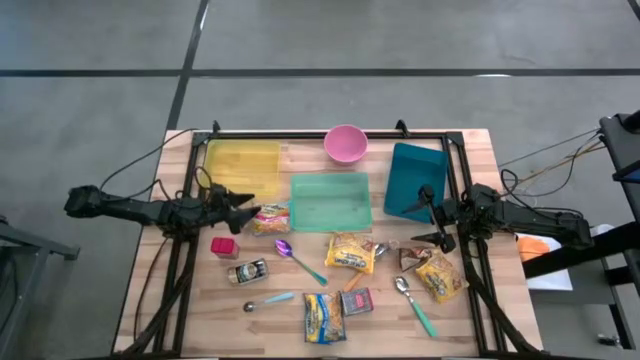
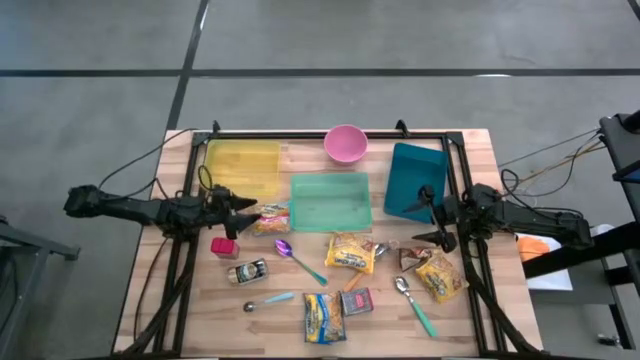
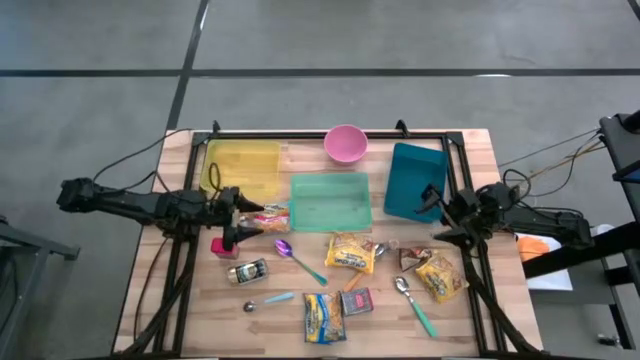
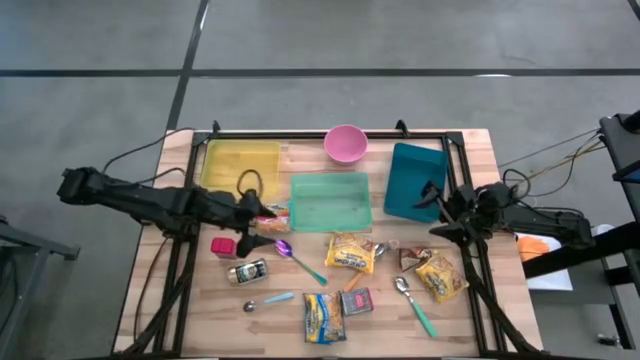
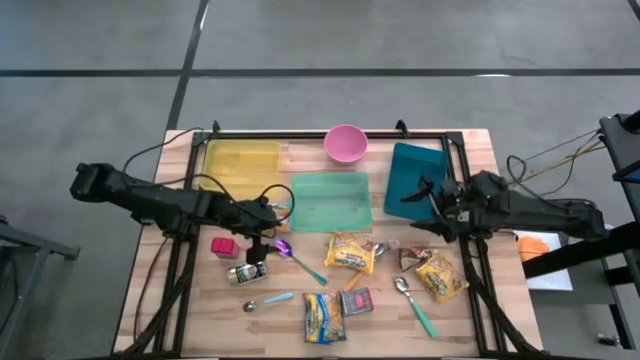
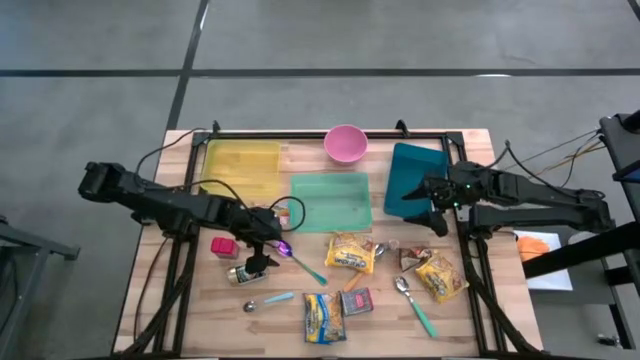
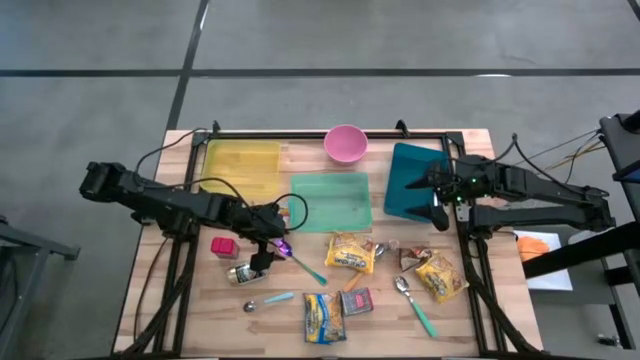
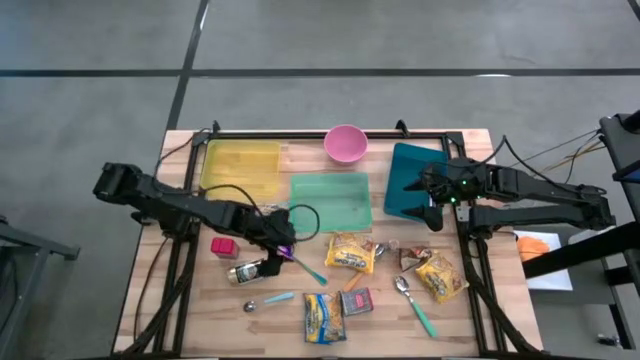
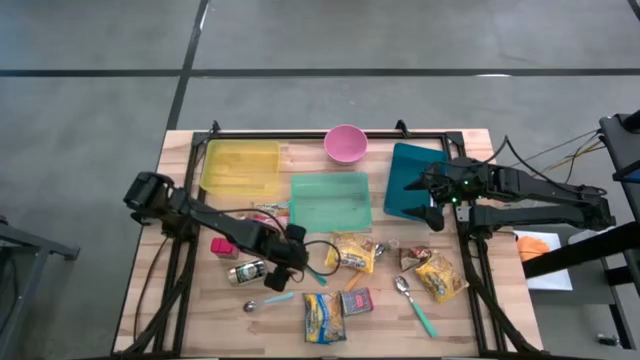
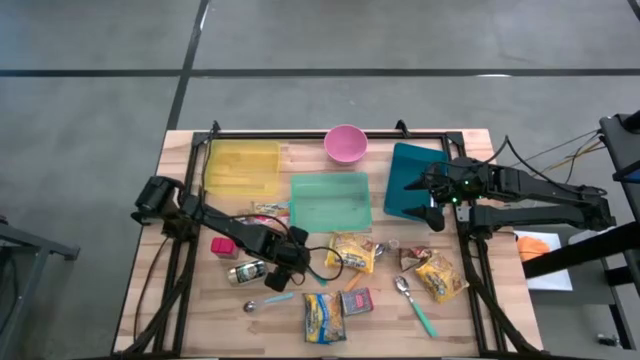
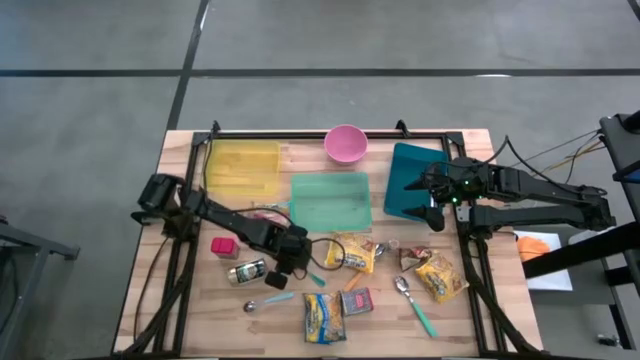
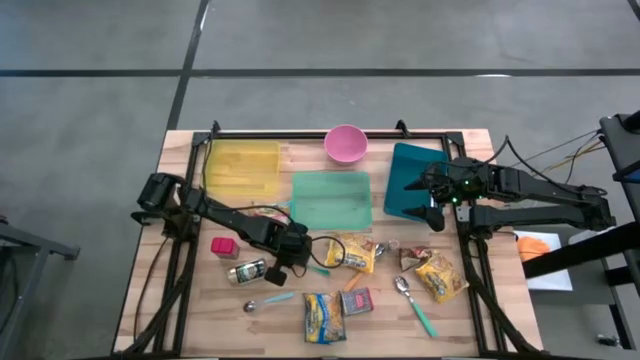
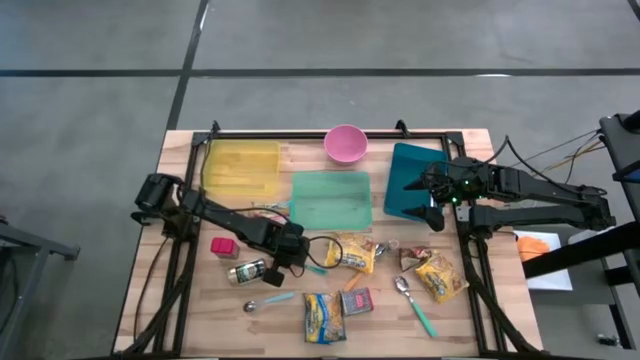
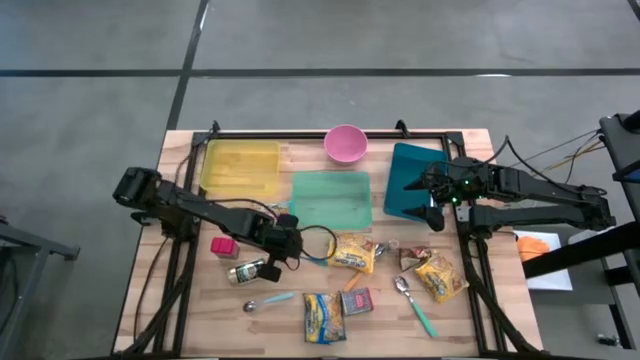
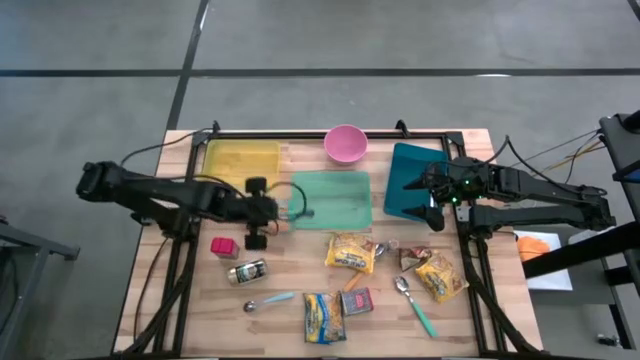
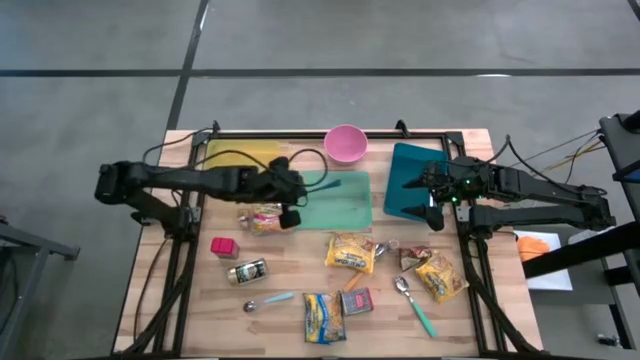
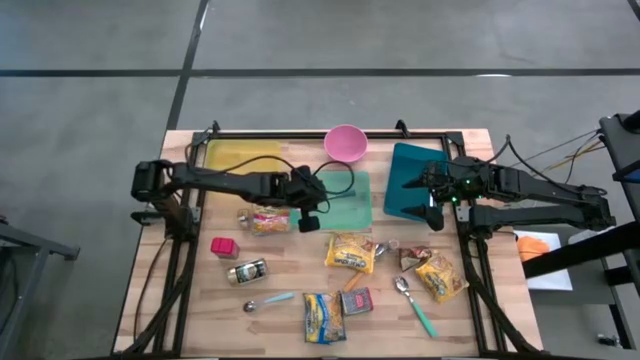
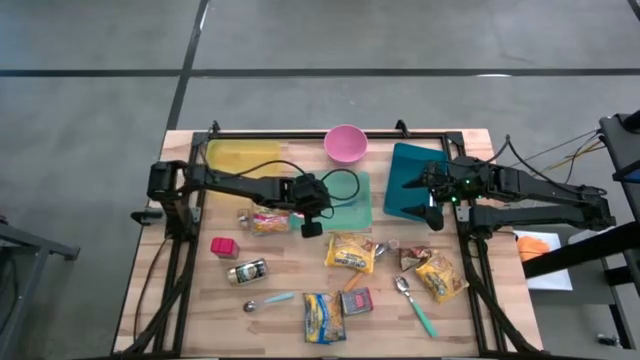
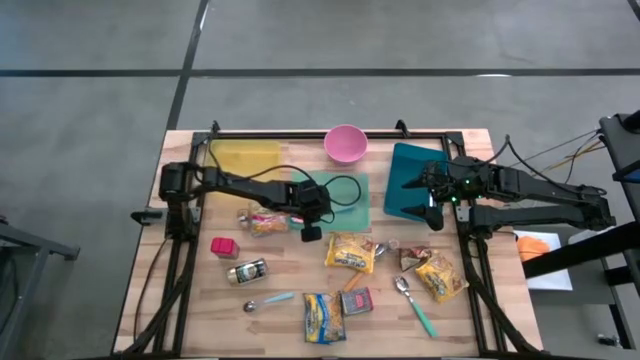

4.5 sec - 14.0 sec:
Put the blue spoon into the green bin

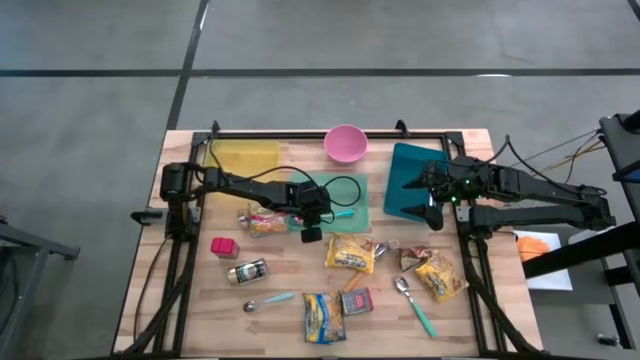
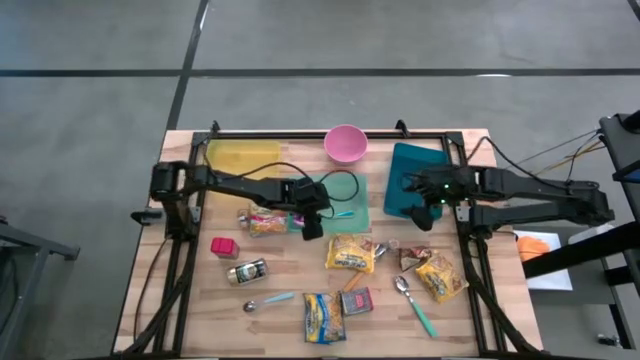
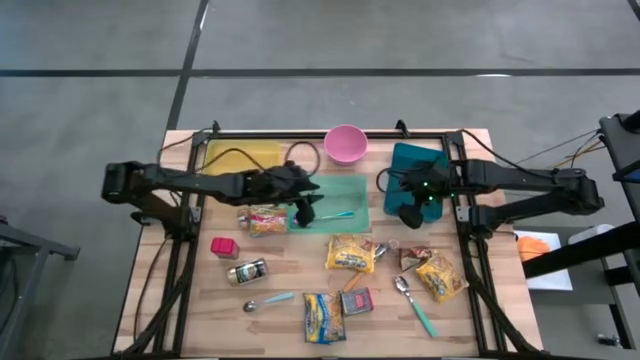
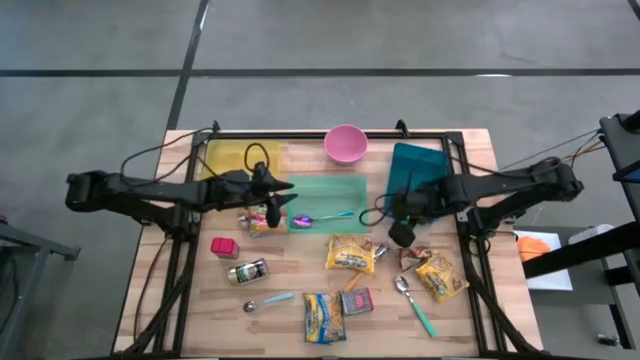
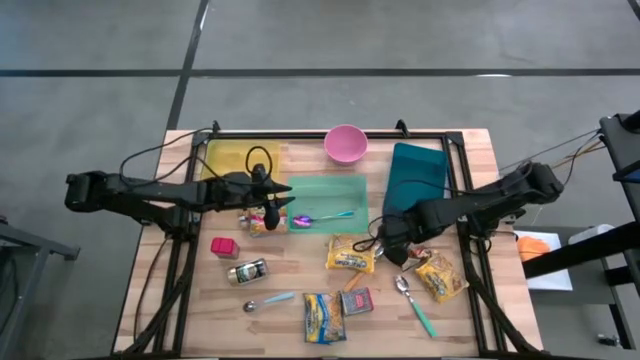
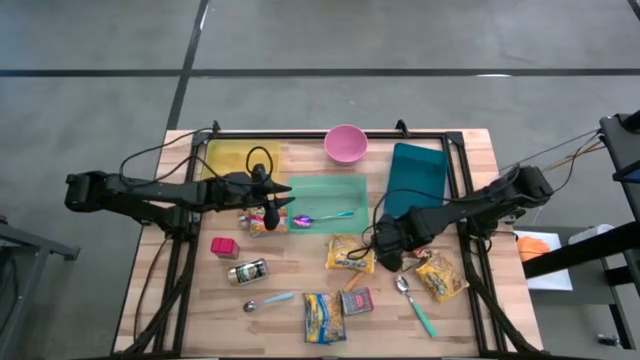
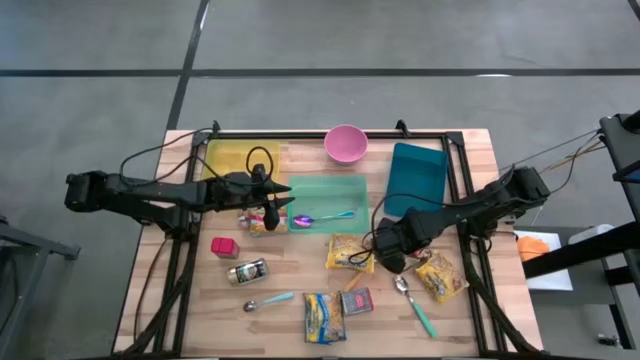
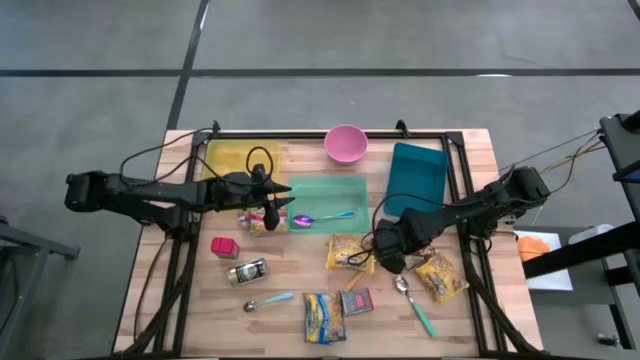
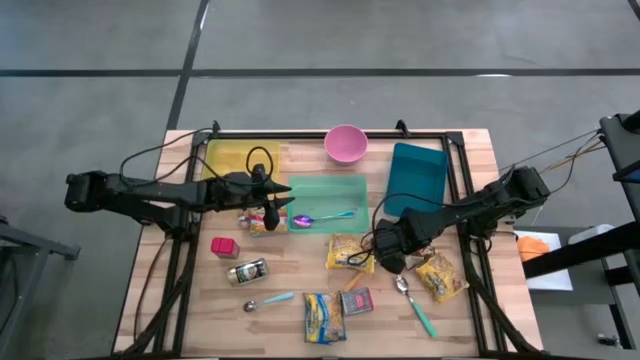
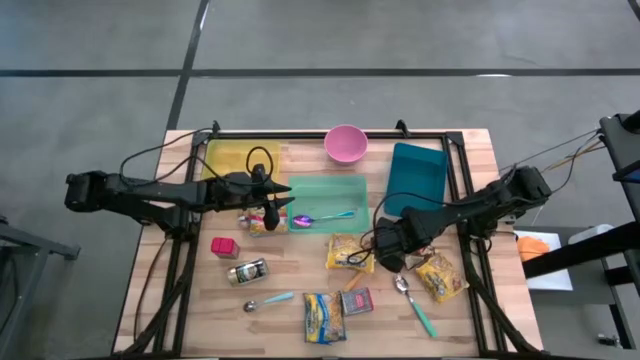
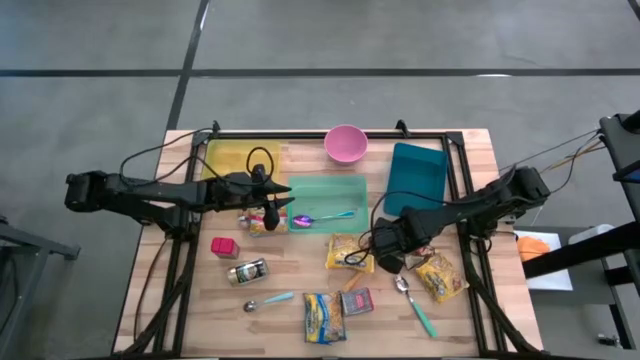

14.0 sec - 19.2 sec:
Put the right brown seasoning bottle into the blue bin

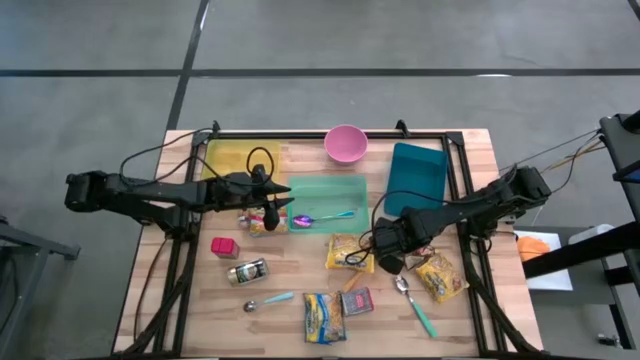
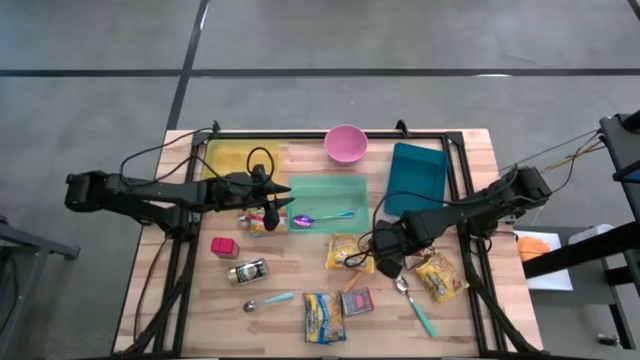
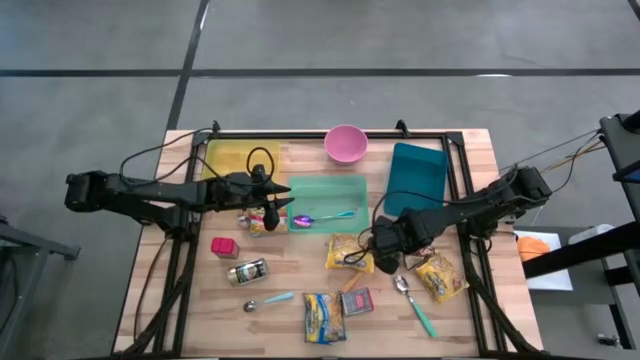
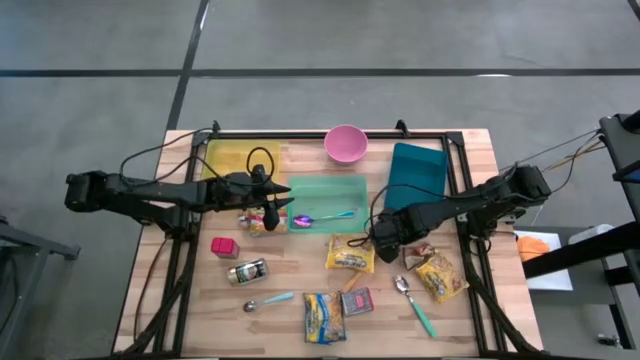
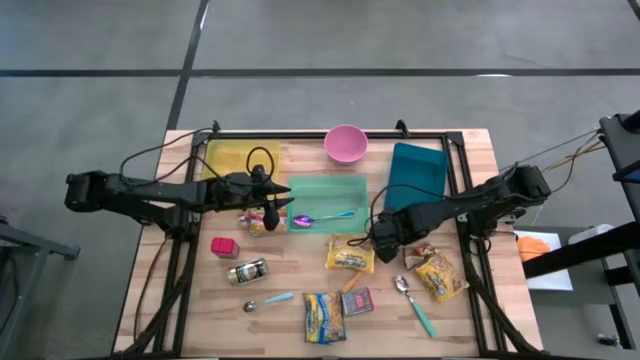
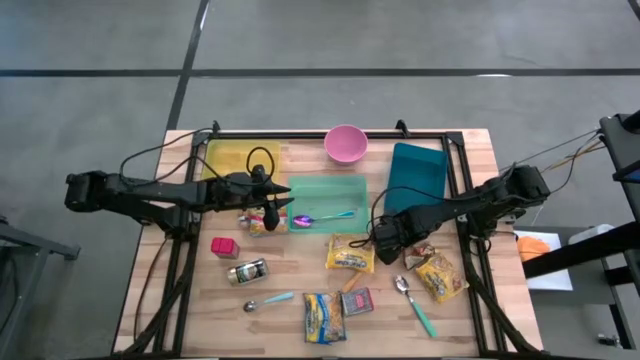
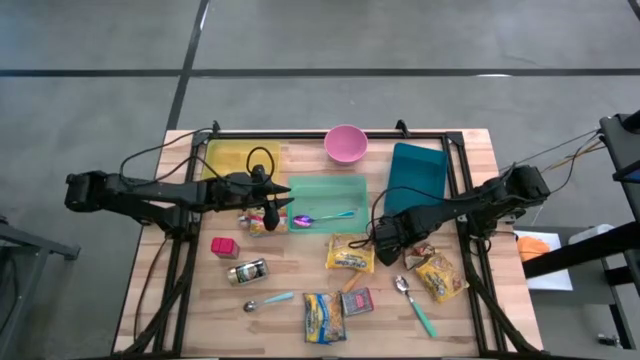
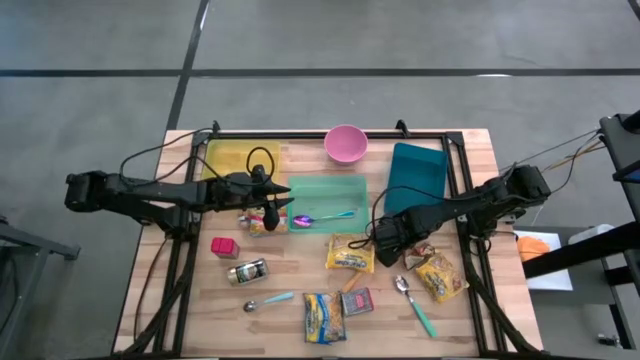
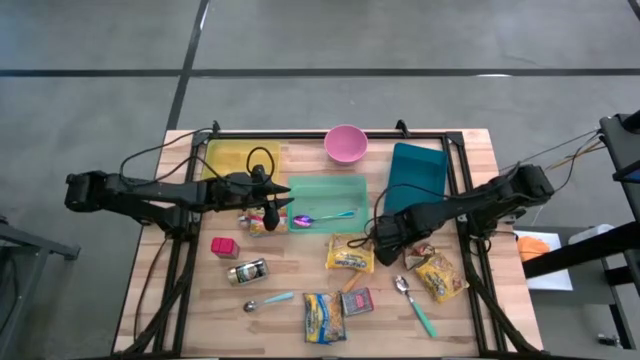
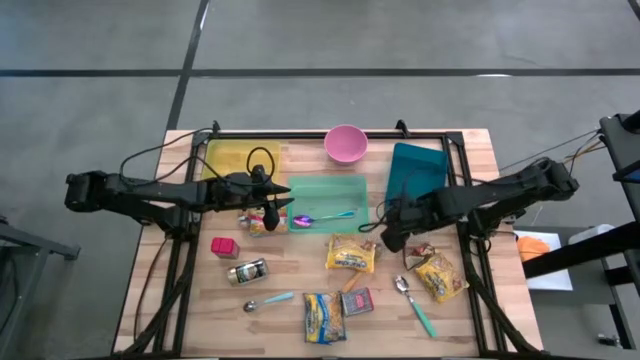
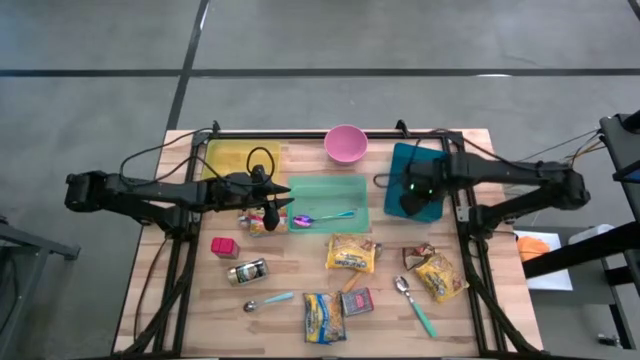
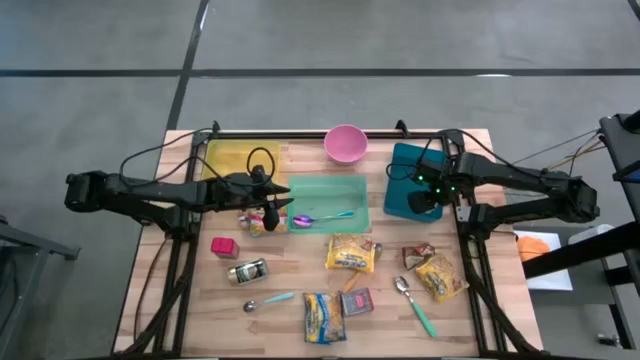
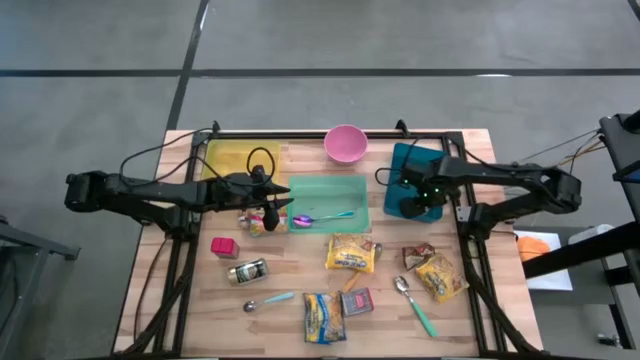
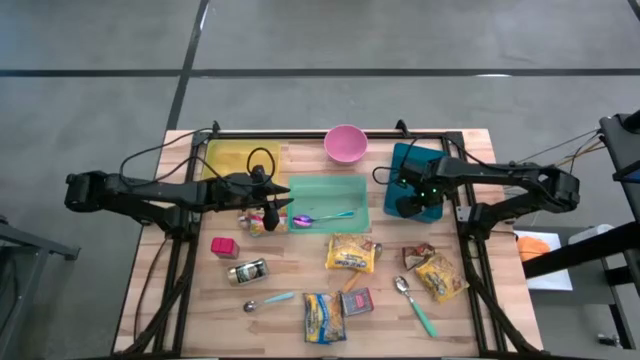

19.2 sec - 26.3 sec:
Put the right brown seasoning bottle into the blue bin
